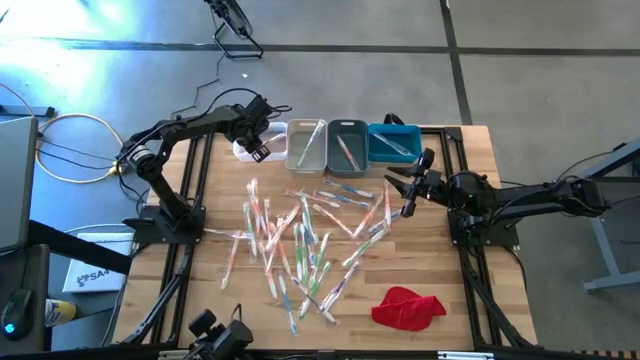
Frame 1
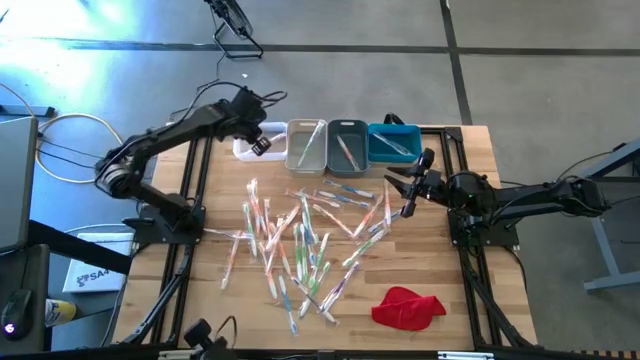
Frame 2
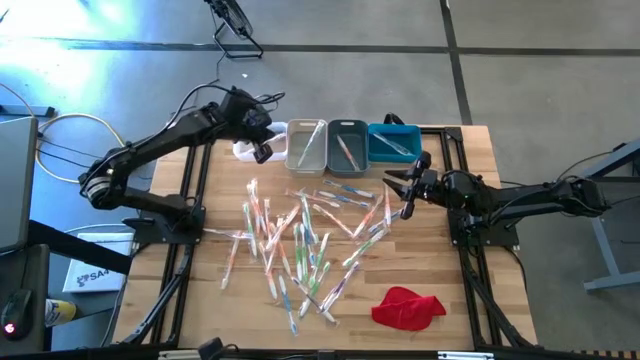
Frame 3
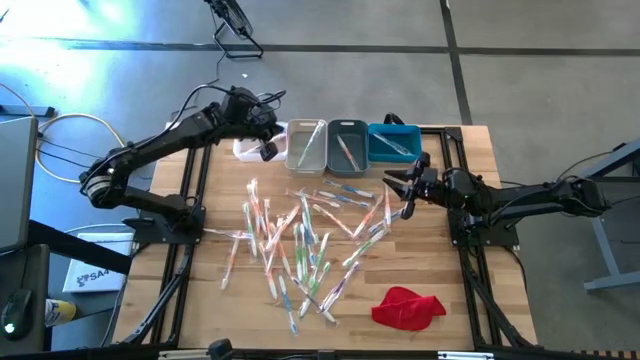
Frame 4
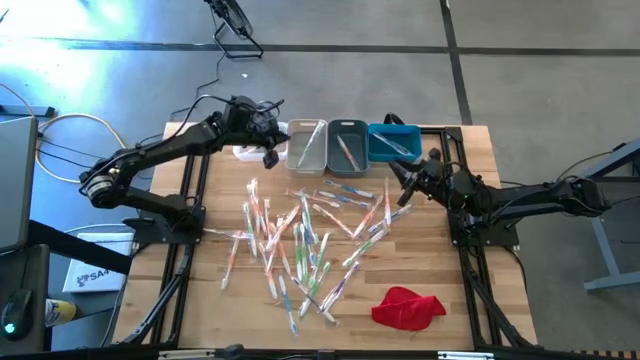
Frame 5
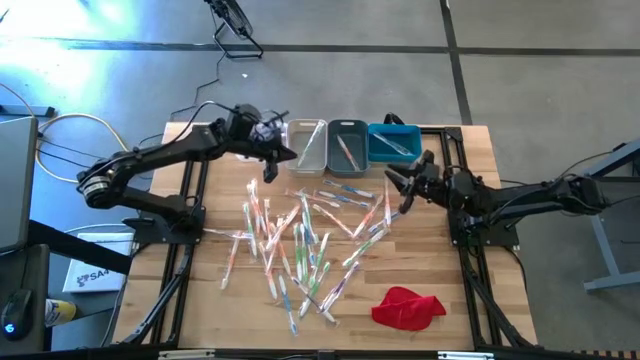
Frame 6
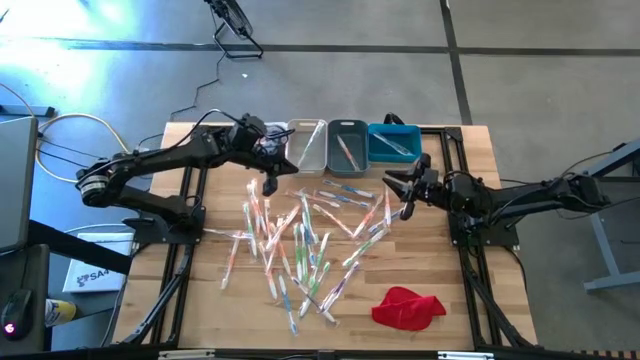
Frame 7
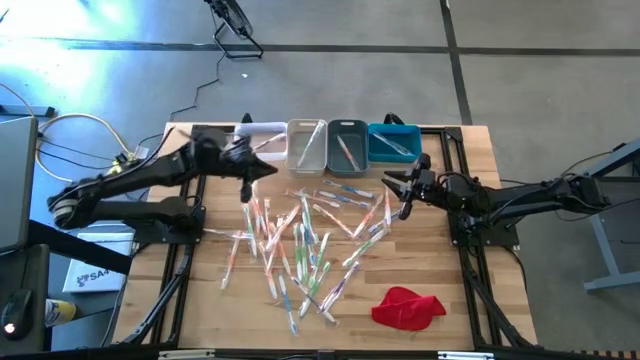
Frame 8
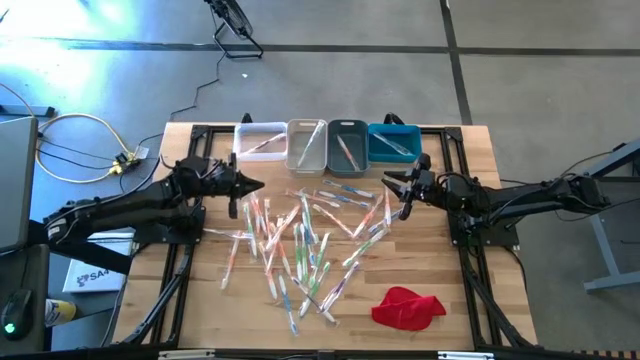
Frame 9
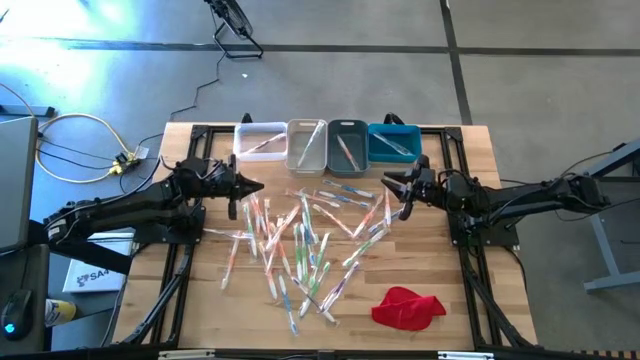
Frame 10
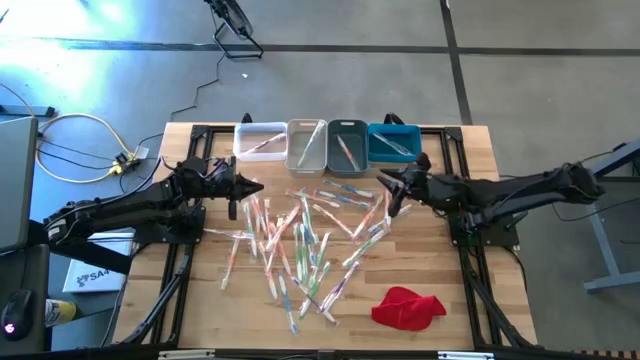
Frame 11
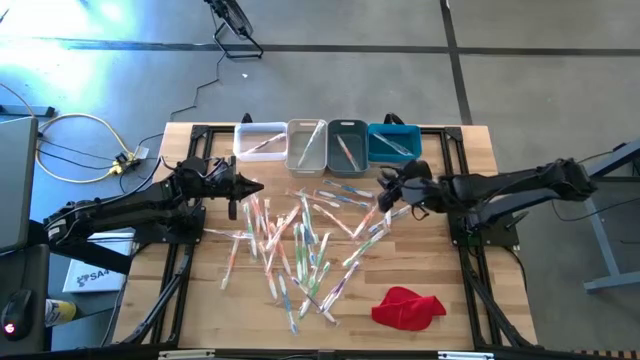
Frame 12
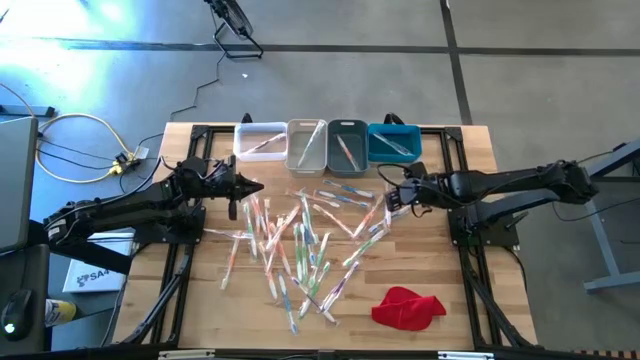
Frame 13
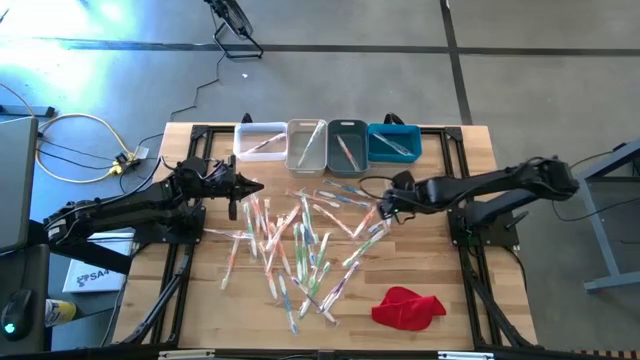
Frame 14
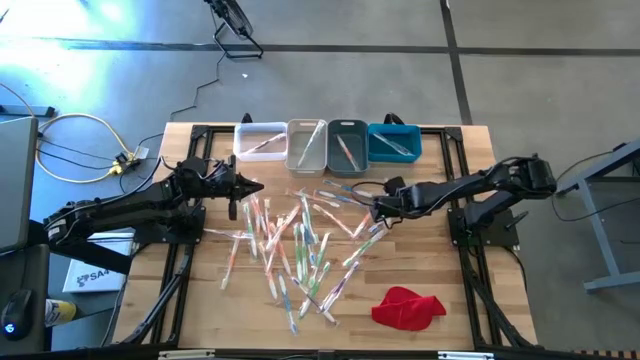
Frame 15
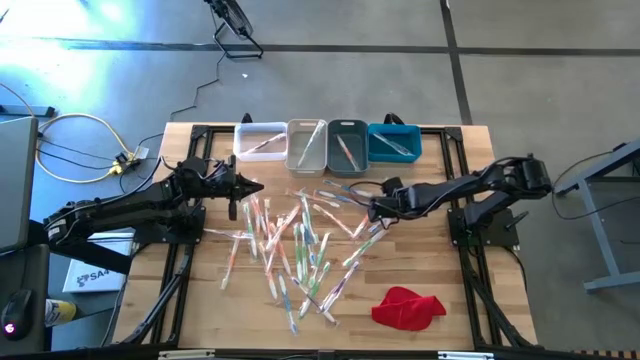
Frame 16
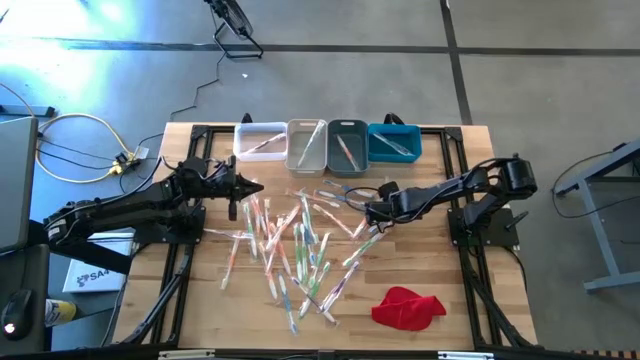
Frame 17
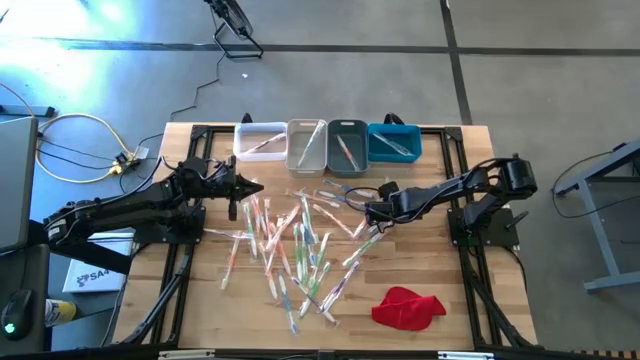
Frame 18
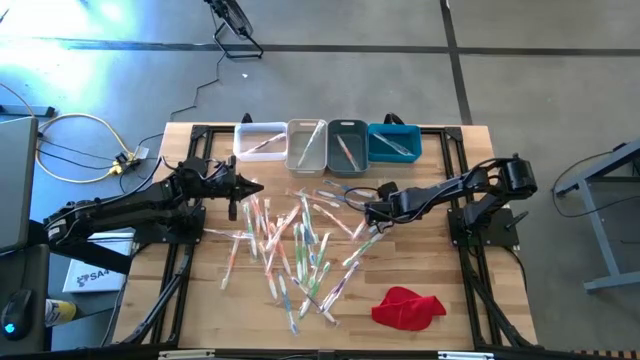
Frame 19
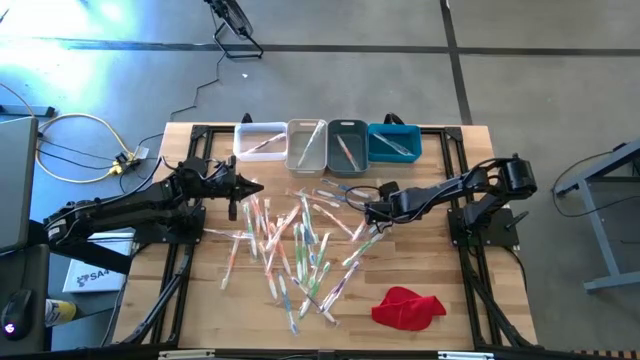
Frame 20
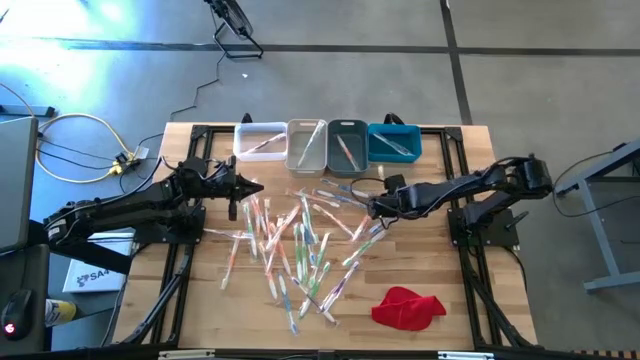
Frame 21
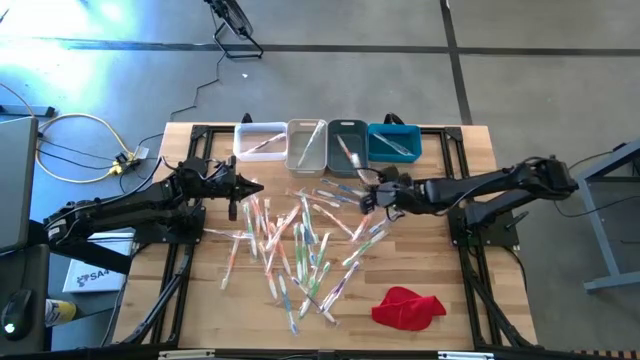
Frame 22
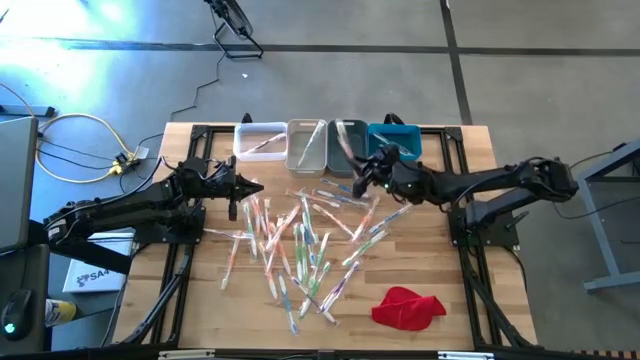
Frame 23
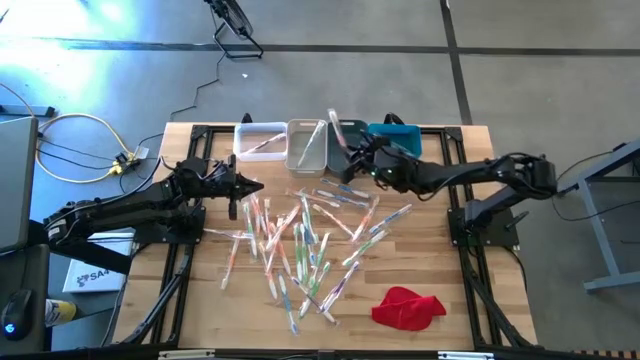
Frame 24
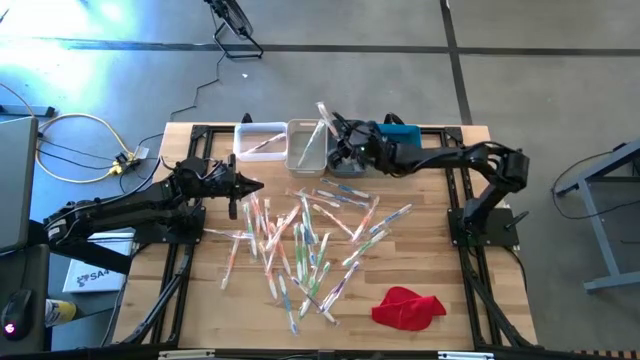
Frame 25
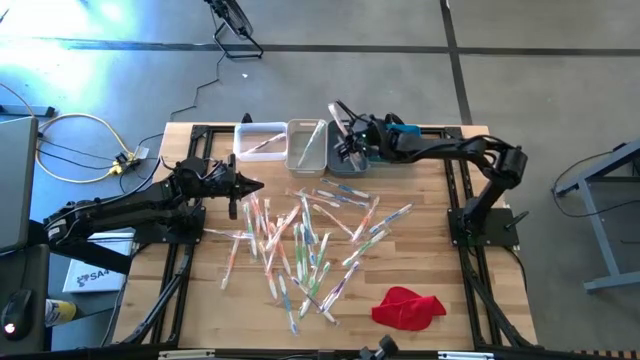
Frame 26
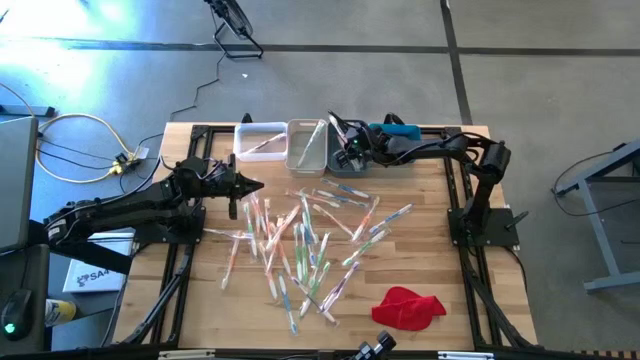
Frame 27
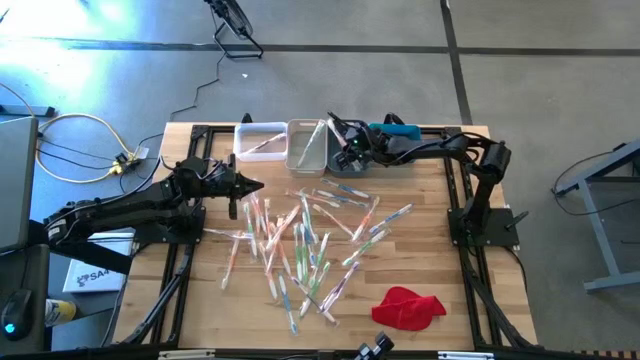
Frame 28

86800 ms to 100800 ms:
Task: Pick & Place Toothbrushes
Put the orange toothbrush into the dark green bin

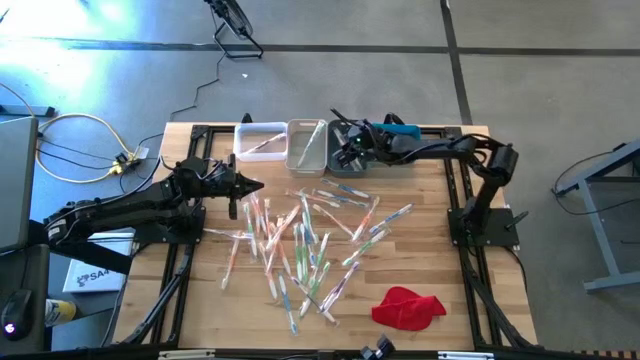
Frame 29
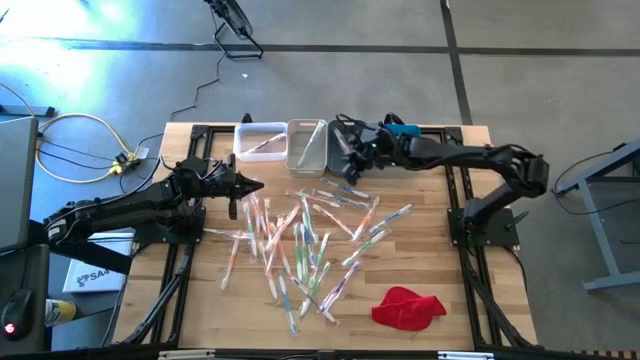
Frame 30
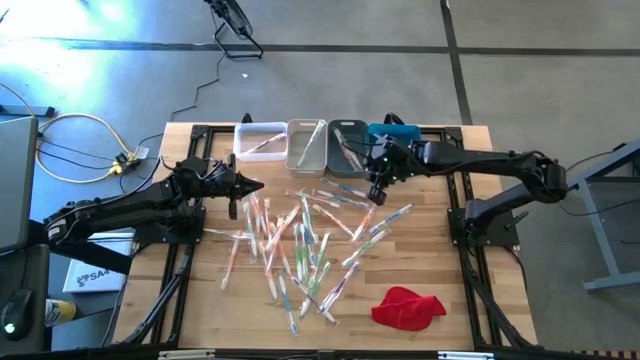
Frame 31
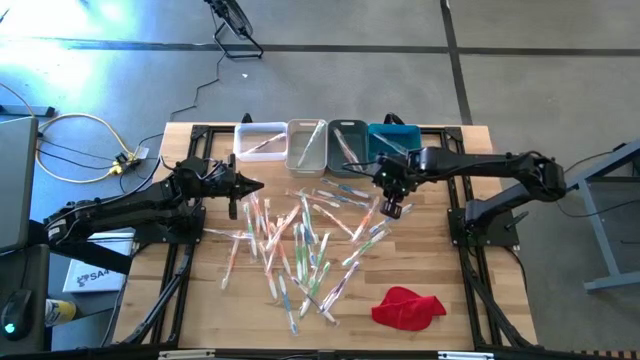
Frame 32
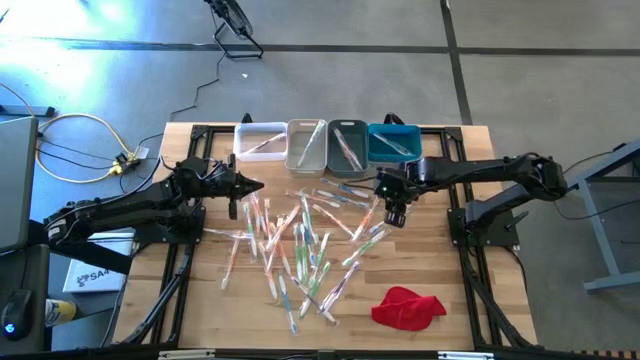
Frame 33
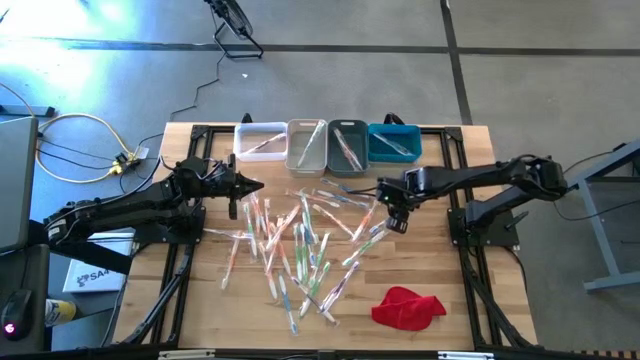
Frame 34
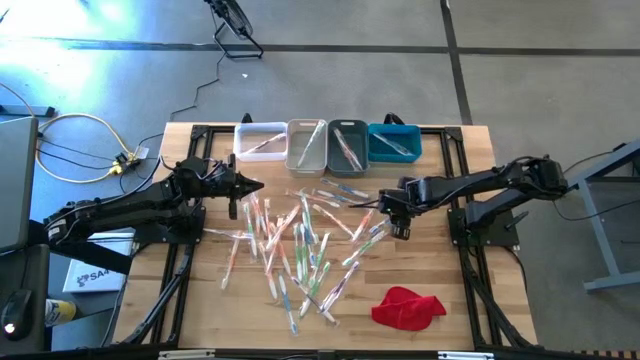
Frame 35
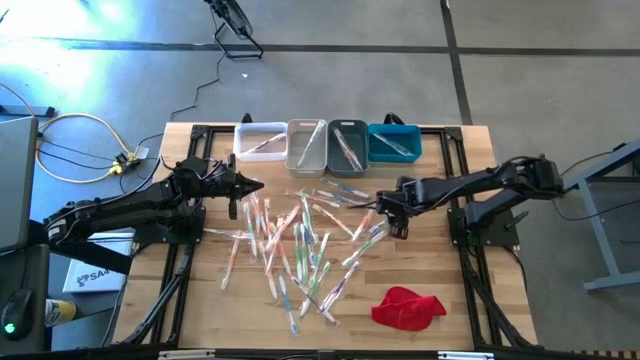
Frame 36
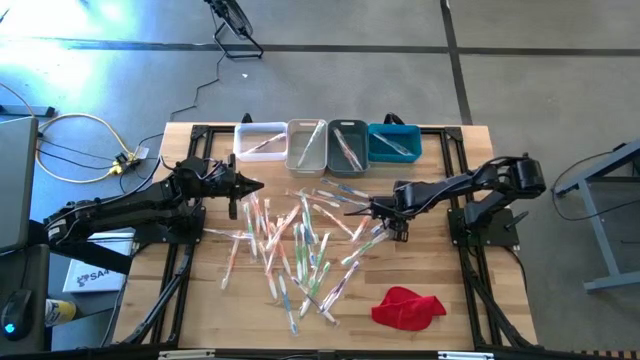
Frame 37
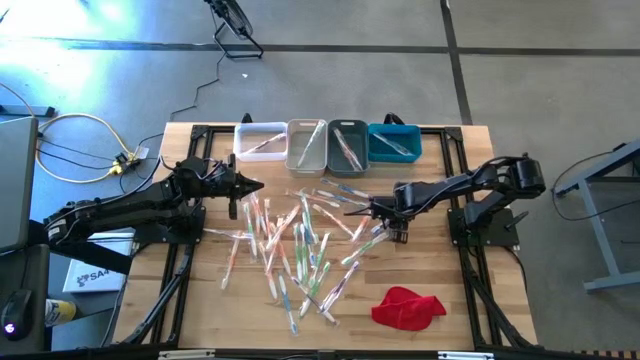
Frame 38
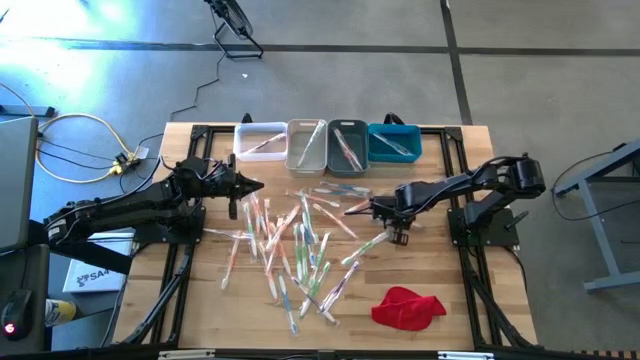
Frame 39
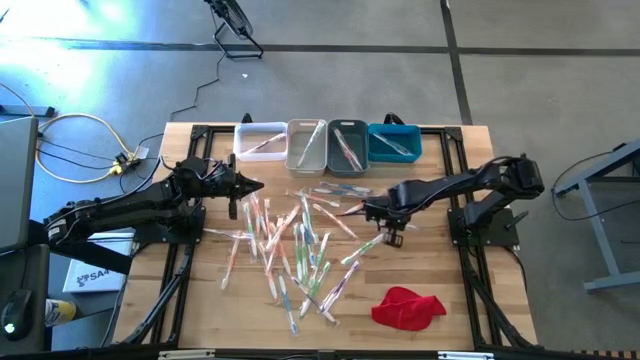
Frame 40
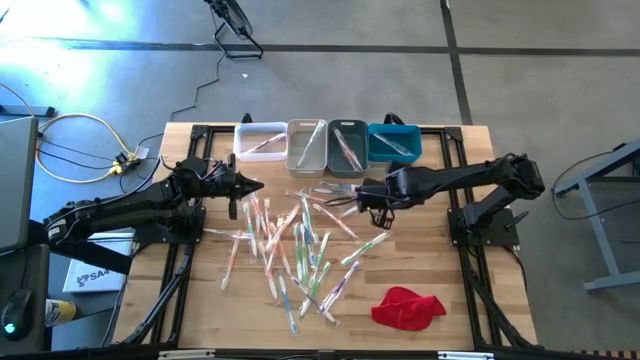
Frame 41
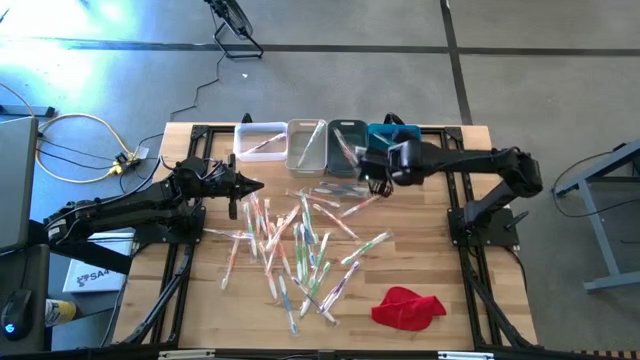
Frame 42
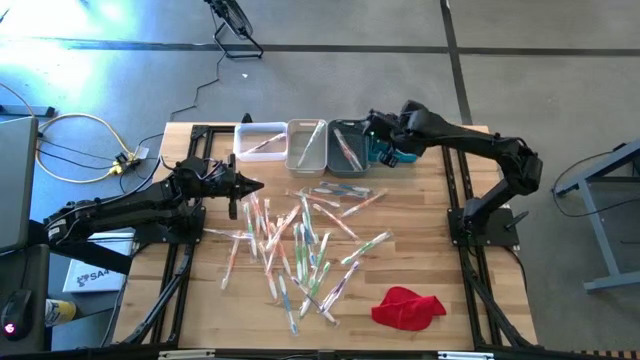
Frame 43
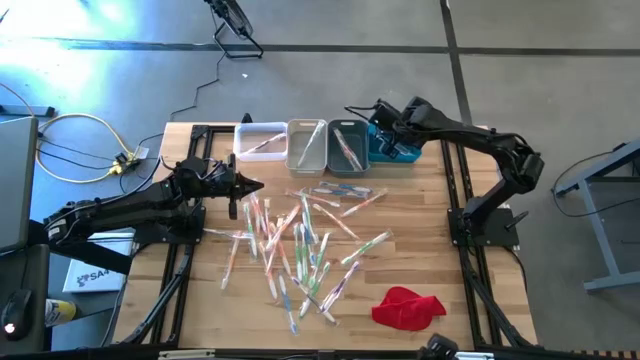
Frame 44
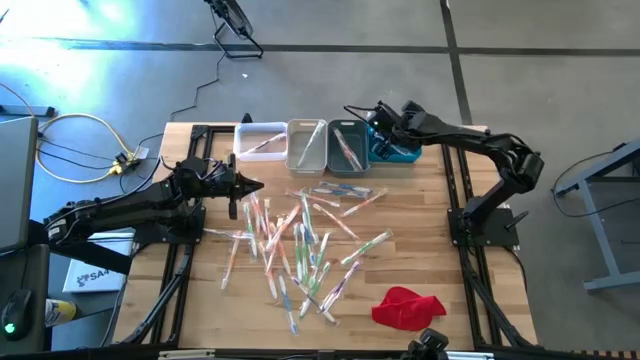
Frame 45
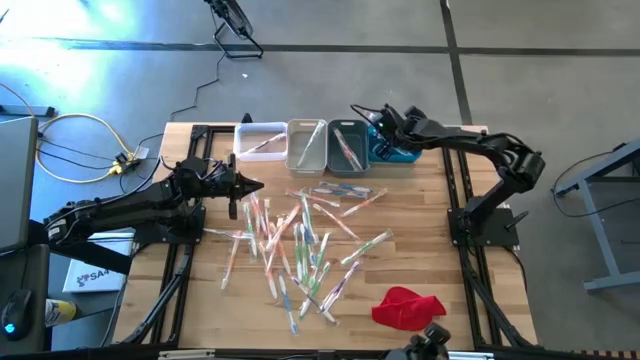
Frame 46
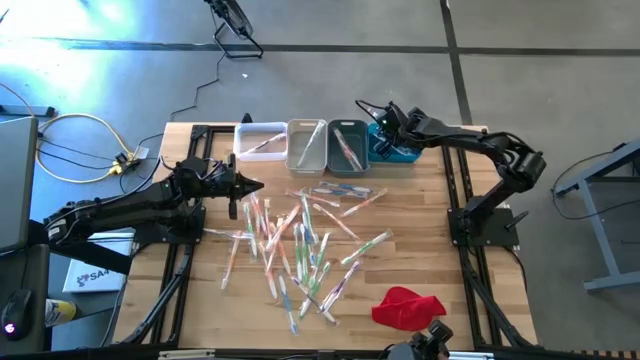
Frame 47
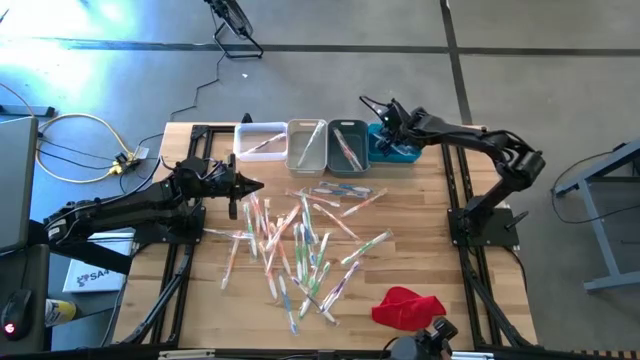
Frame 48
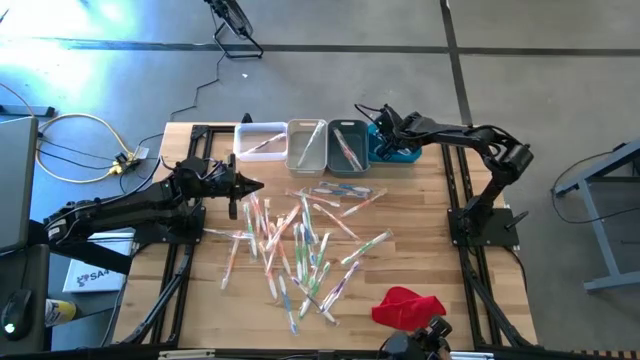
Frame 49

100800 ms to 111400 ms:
Put the blue toothbrush into the blue bin
